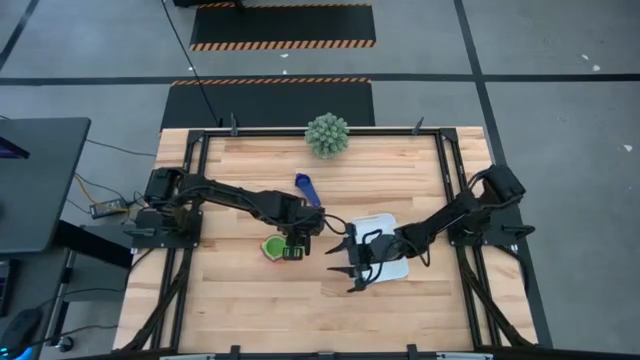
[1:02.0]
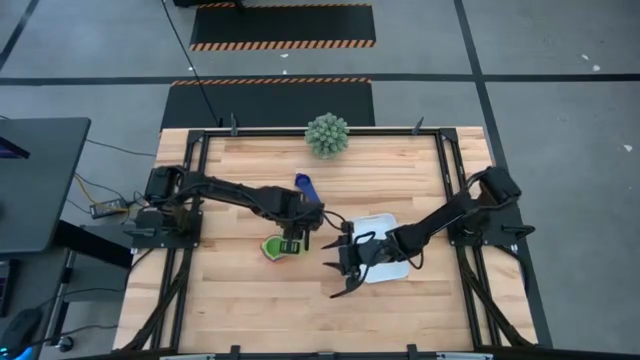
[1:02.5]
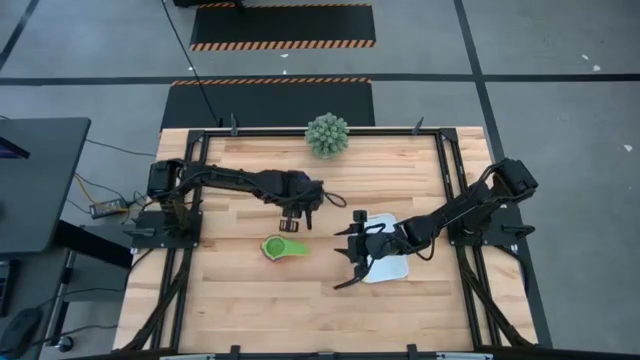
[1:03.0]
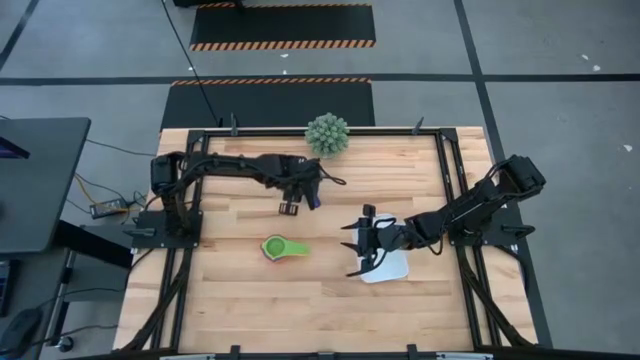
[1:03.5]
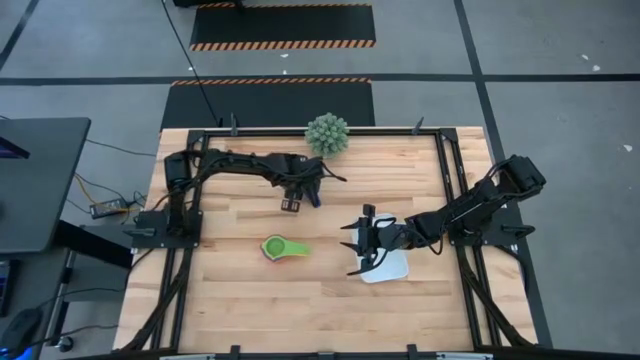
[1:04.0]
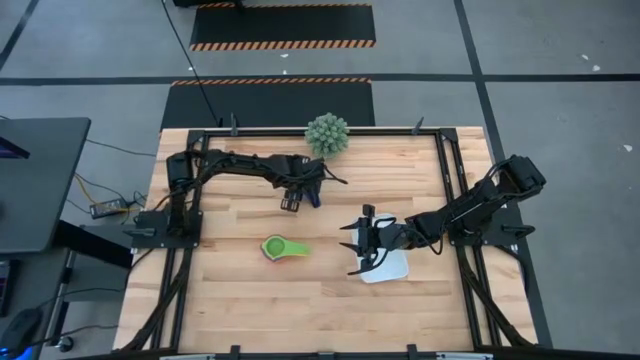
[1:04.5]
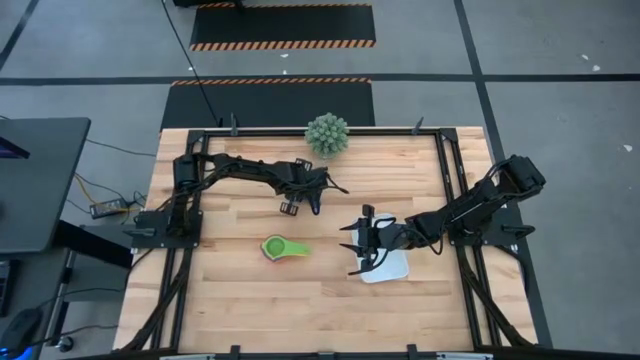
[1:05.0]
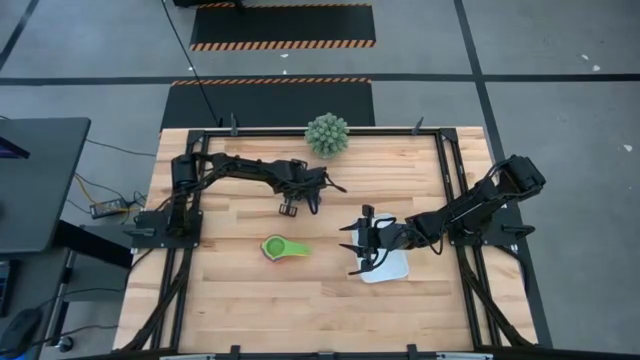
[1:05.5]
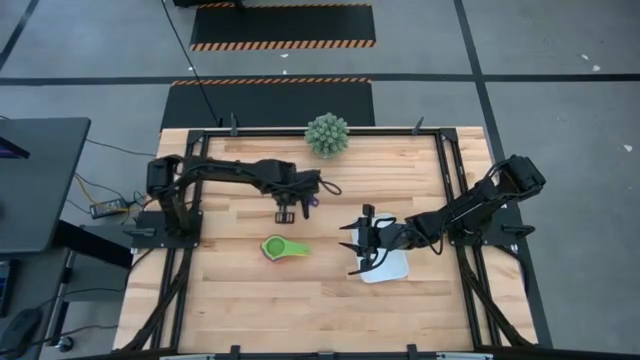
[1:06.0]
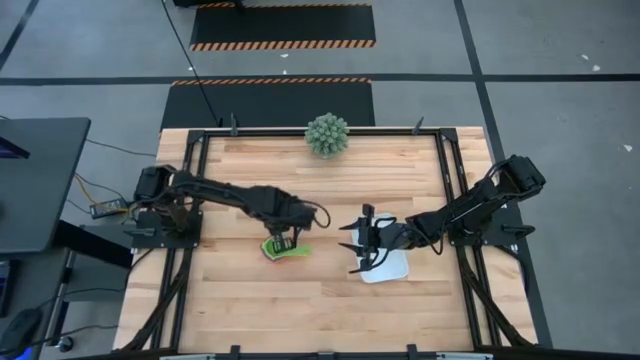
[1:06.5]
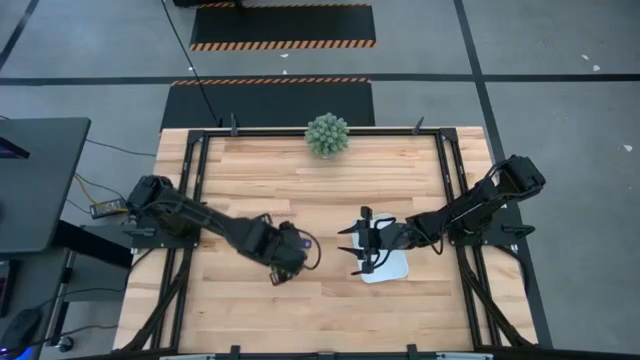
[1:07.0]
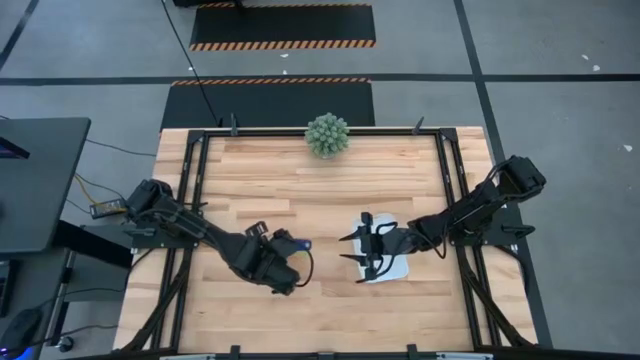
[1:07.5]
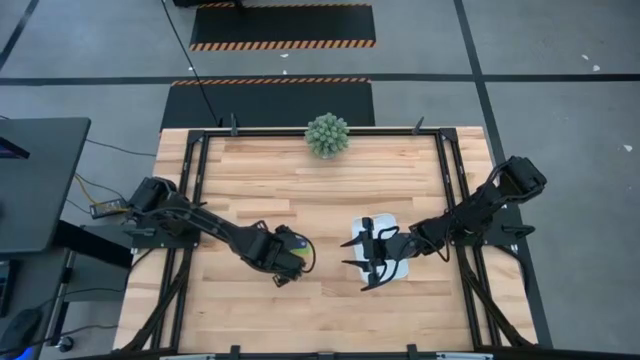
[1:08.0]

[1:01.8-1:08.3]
Task: Nest measuring cups in basket
Stack the dark blue measuring cup into the green measuring

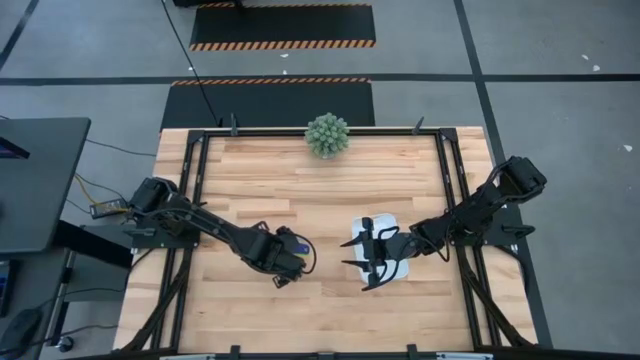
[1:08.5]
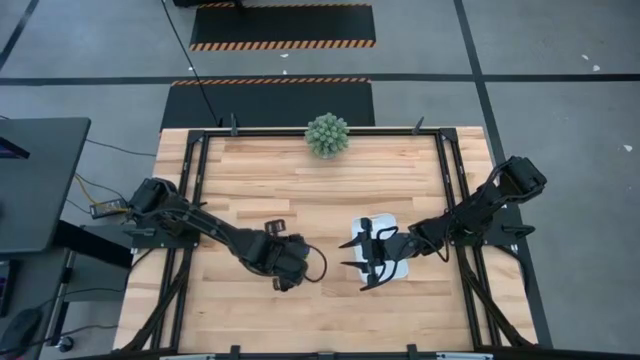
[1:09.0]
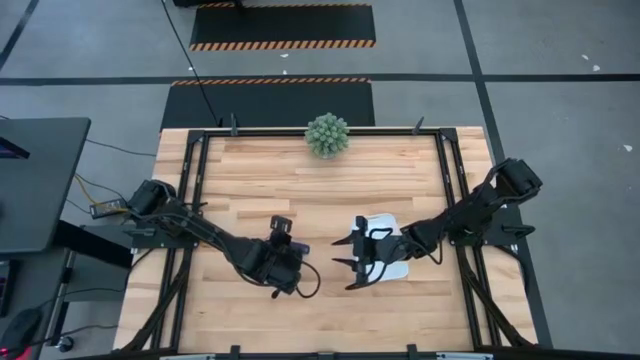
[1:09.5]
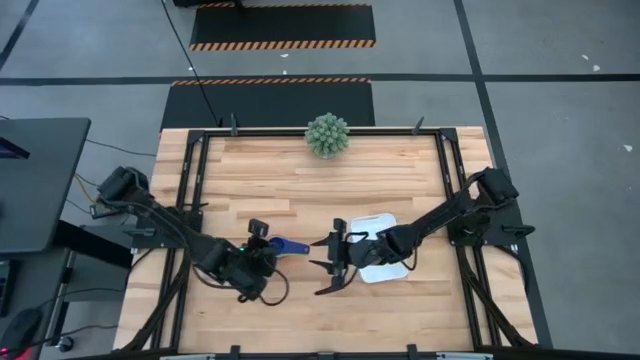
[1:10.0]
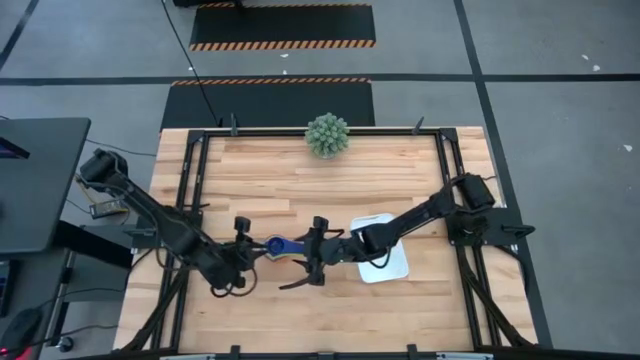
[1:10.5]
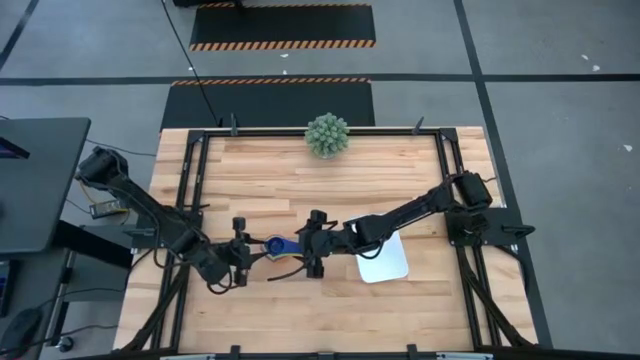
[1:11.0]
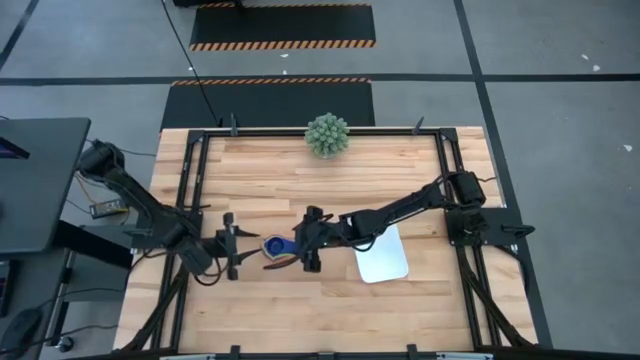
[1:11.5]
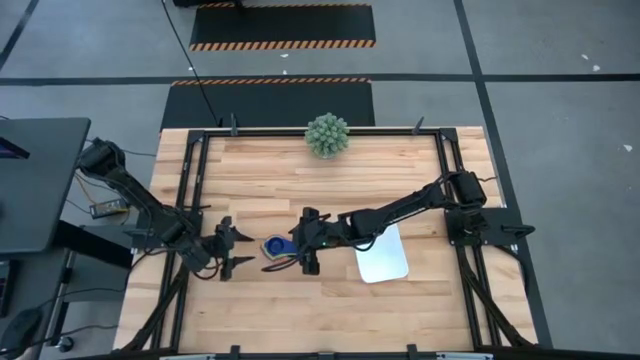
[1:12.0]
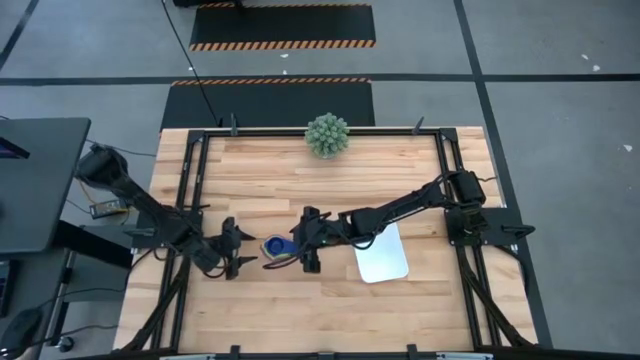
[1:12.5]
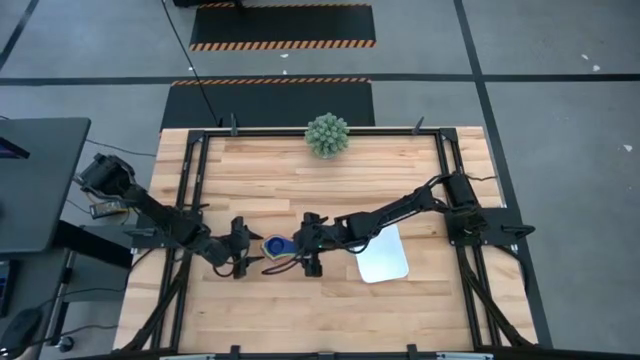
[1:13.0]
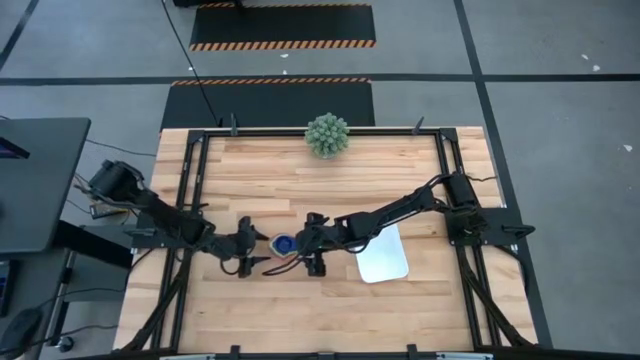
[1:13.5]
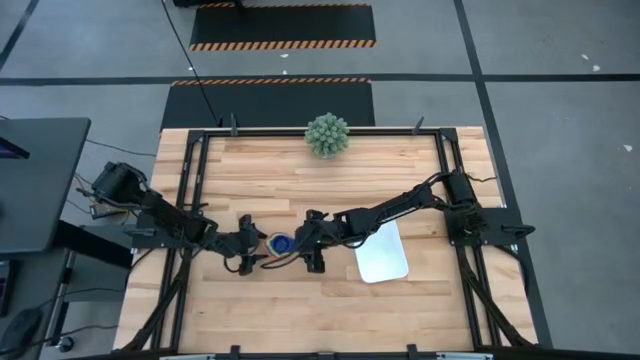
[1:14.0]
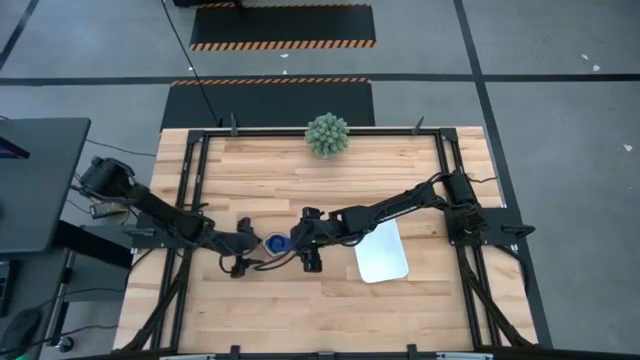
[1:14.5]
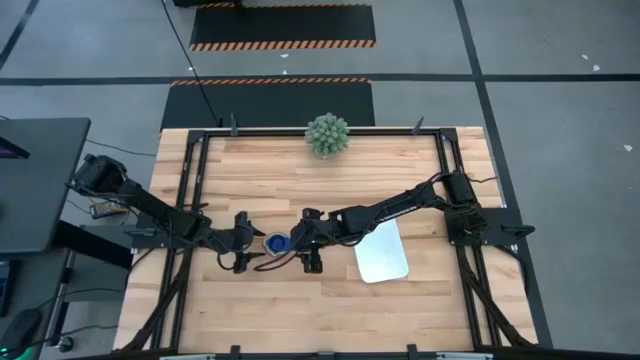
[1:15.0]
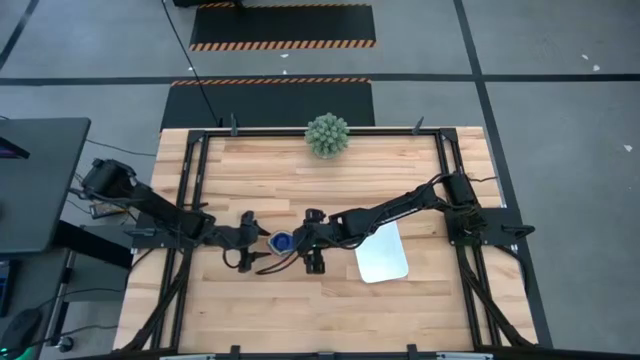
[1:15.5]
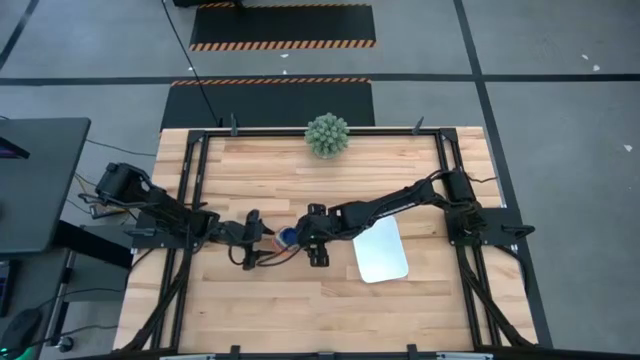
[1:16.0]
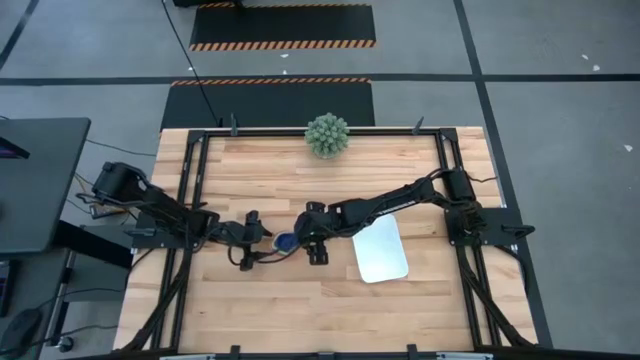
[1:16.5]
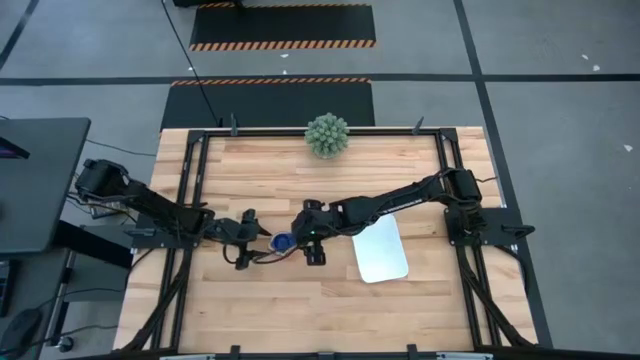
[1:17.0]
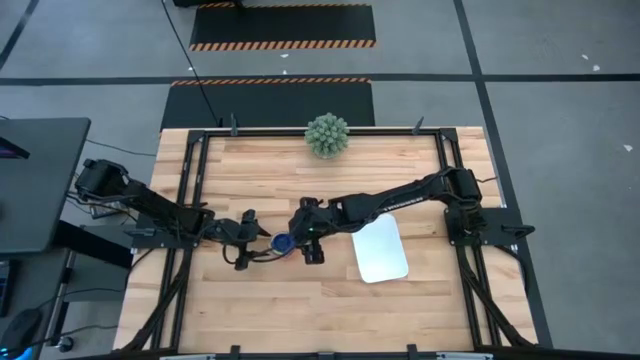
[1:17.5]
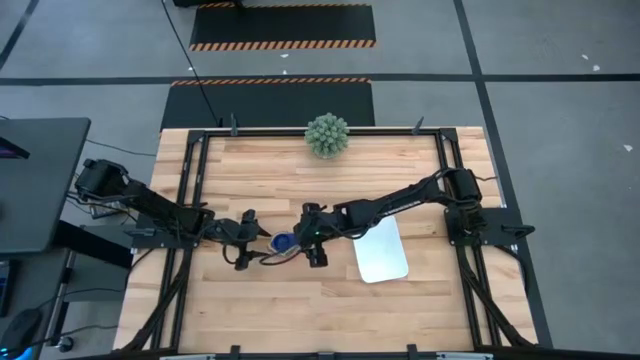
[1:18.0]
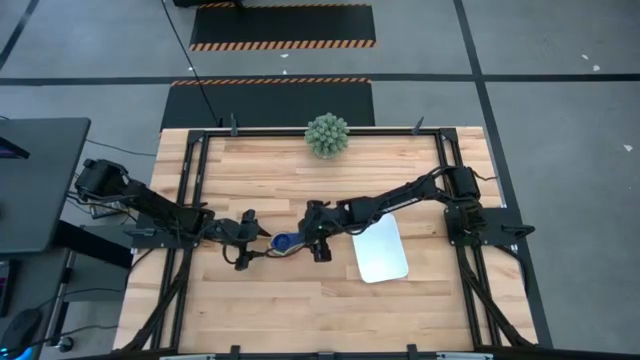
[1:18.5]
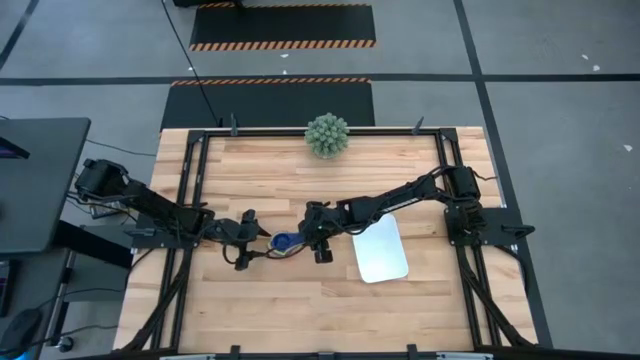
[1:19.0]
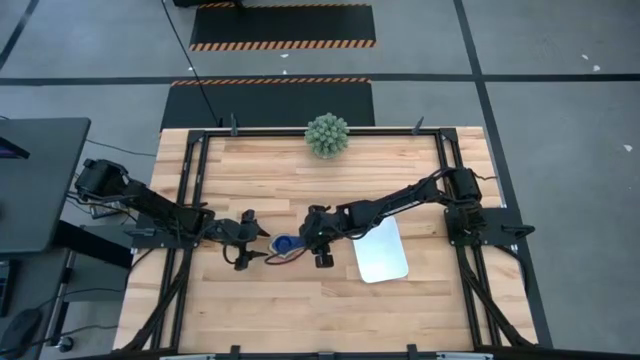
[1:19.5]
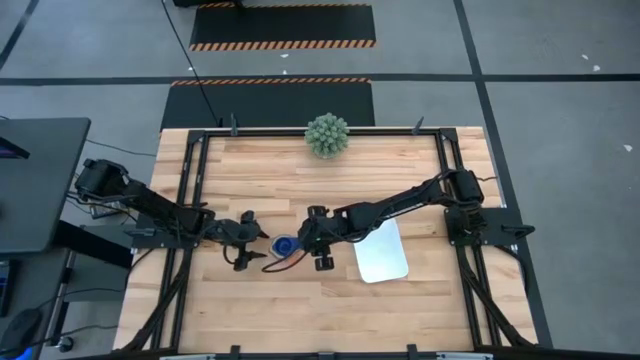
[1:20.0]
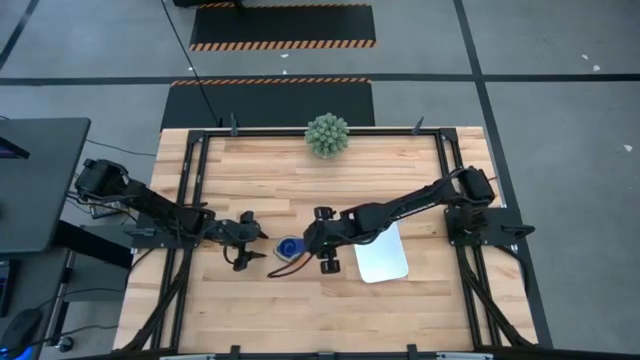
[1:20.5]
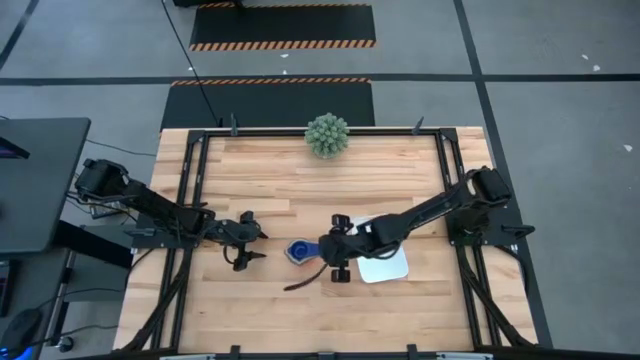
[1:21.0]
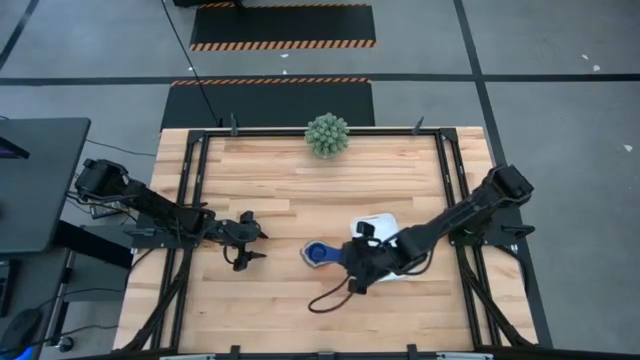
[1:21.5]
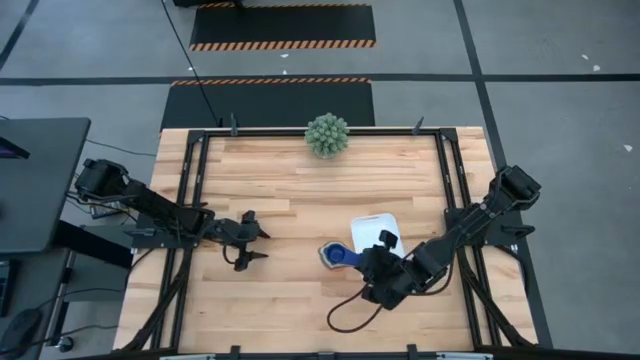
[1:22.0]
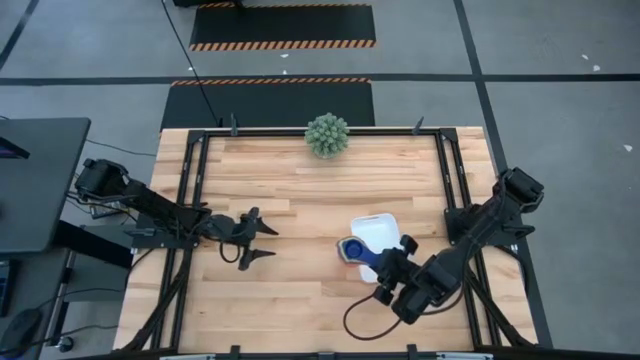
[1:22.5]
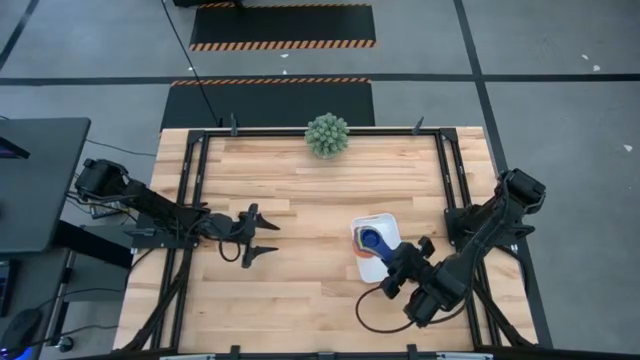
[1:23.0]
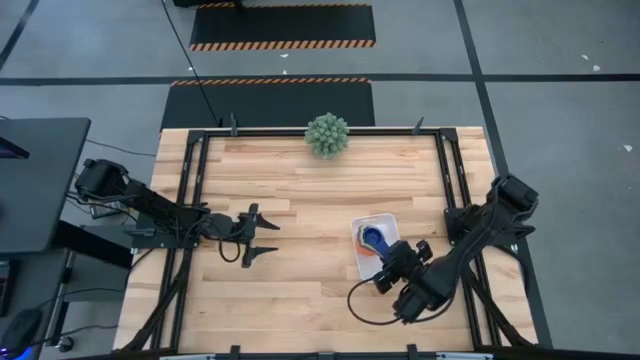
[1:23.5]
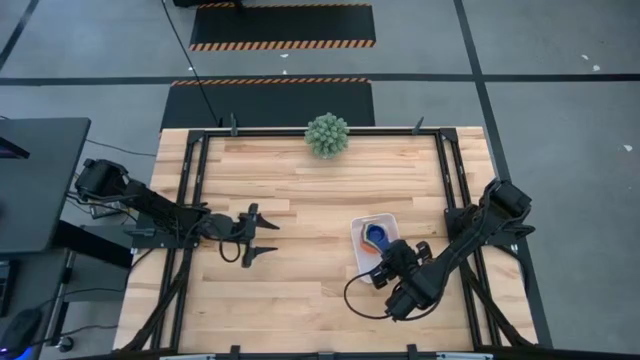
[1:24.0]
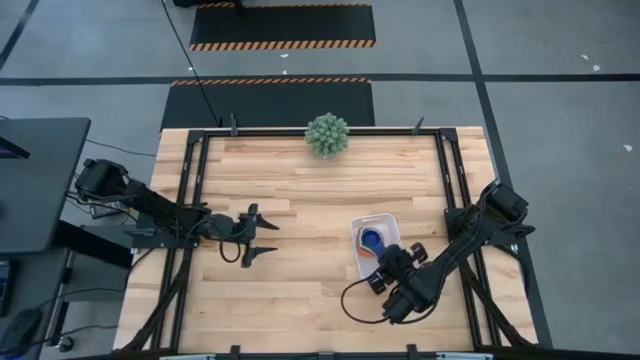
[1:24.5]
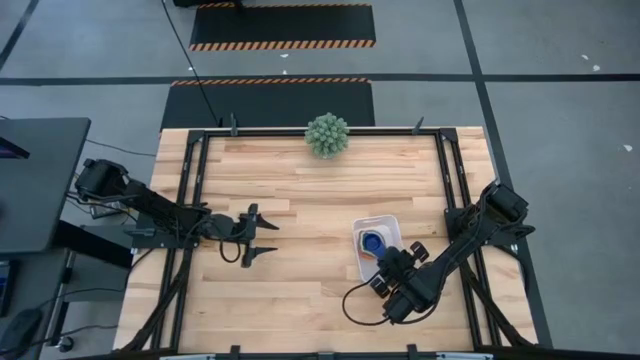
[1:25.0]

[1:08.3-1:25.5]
Put the measuring cups into the white bin
